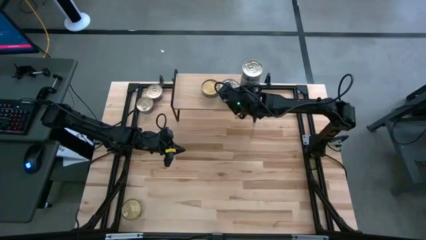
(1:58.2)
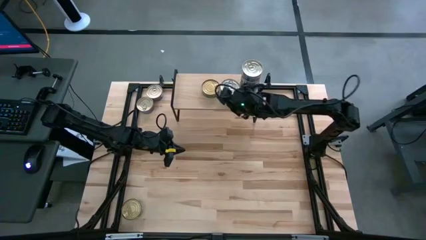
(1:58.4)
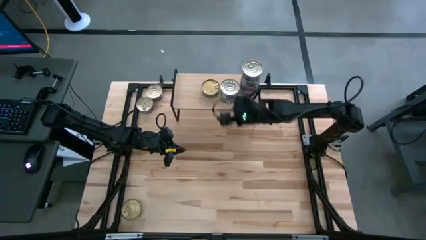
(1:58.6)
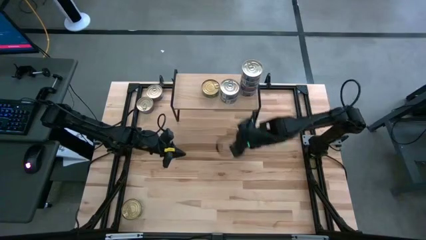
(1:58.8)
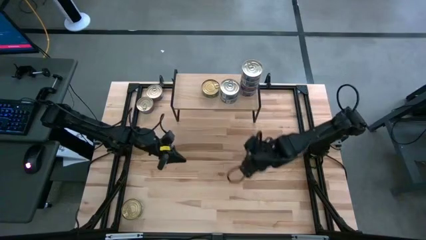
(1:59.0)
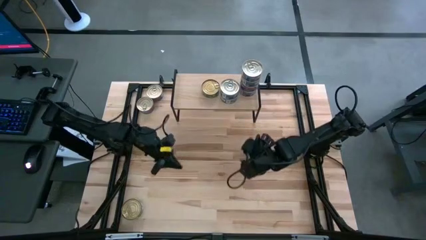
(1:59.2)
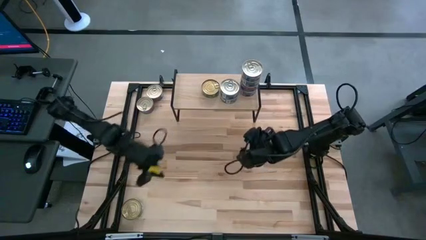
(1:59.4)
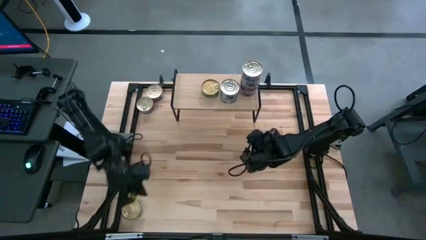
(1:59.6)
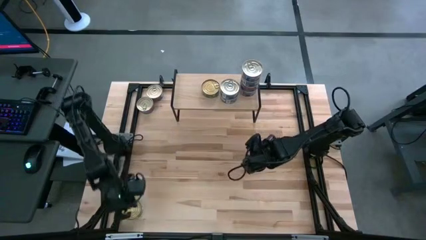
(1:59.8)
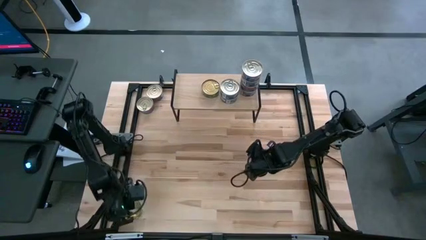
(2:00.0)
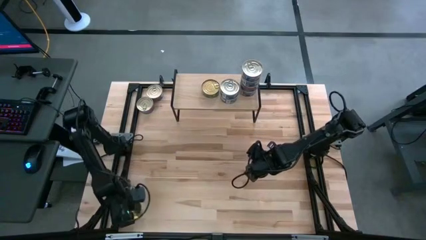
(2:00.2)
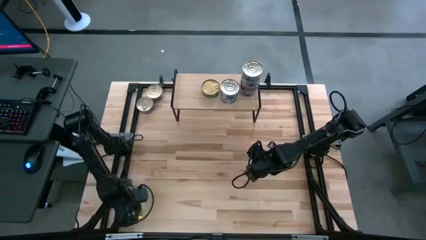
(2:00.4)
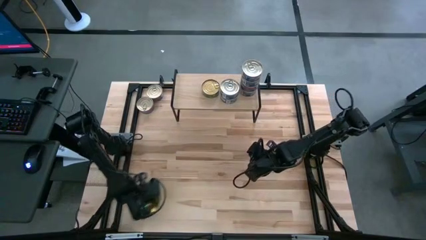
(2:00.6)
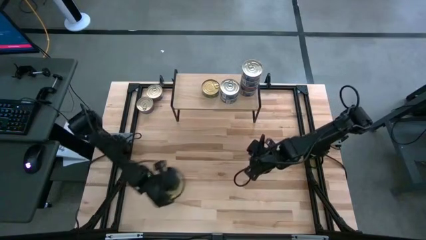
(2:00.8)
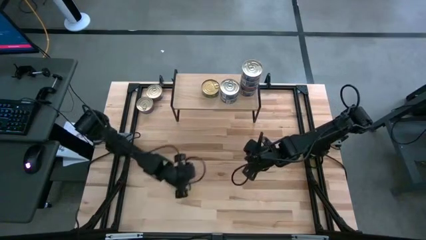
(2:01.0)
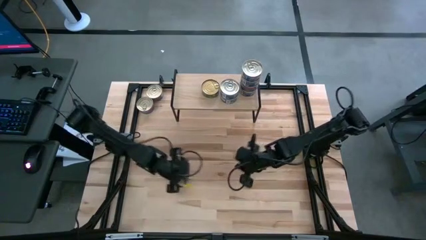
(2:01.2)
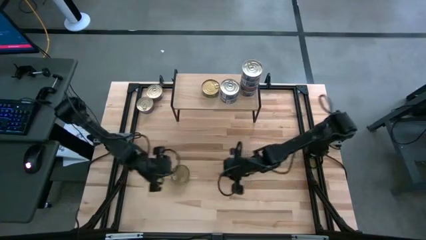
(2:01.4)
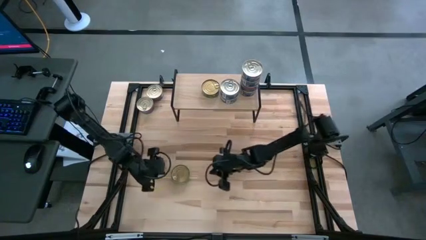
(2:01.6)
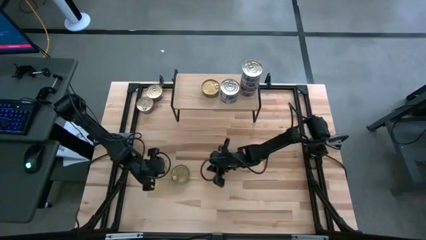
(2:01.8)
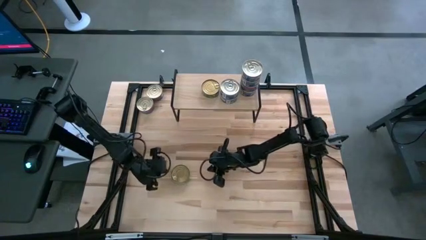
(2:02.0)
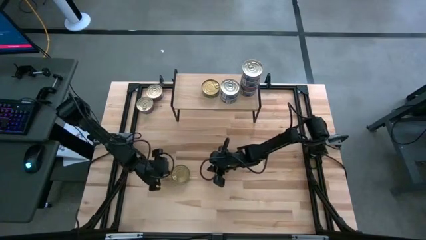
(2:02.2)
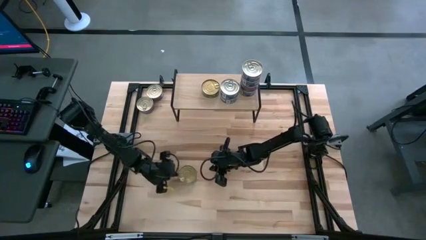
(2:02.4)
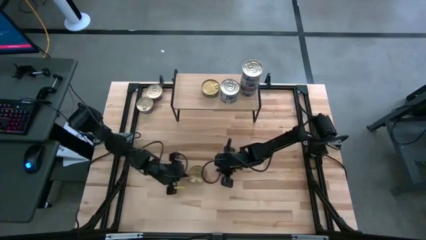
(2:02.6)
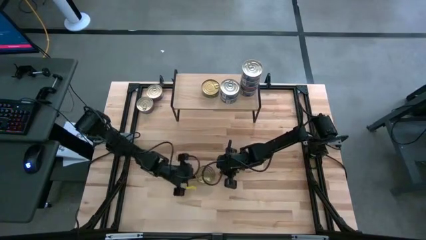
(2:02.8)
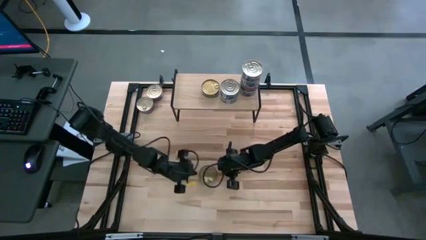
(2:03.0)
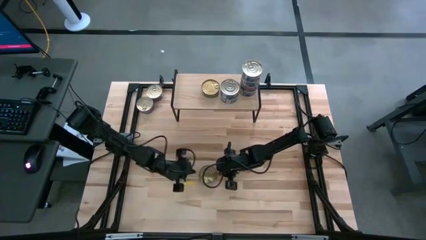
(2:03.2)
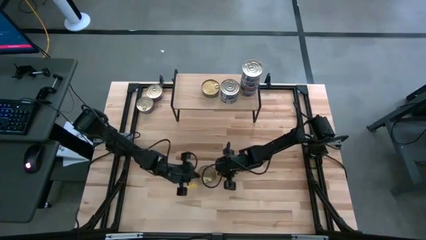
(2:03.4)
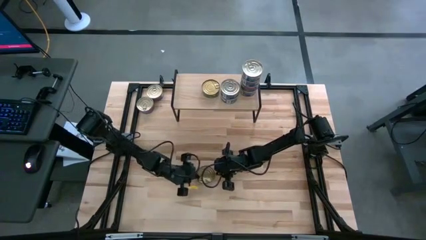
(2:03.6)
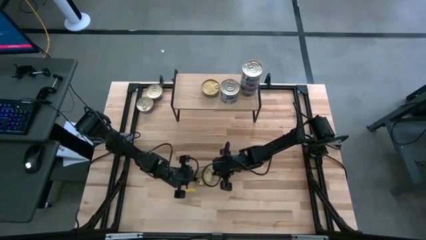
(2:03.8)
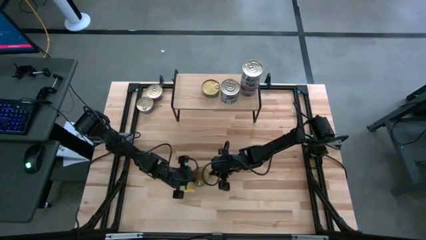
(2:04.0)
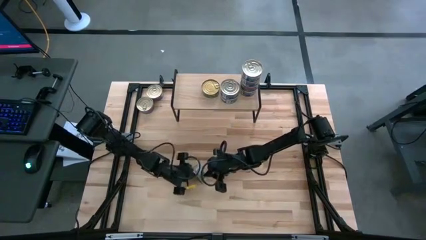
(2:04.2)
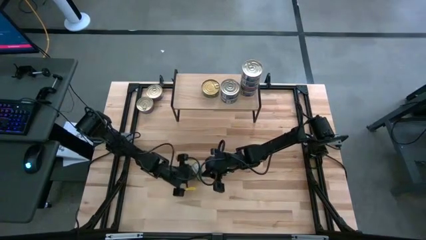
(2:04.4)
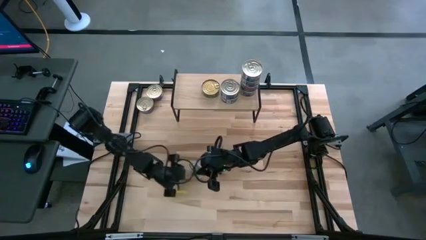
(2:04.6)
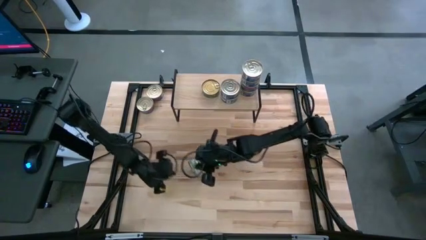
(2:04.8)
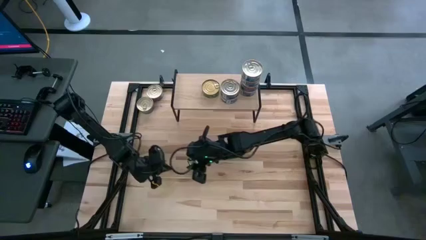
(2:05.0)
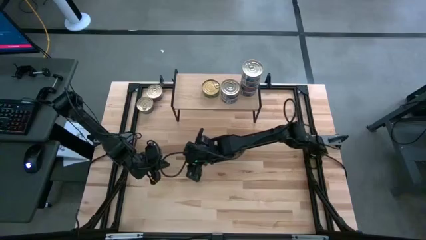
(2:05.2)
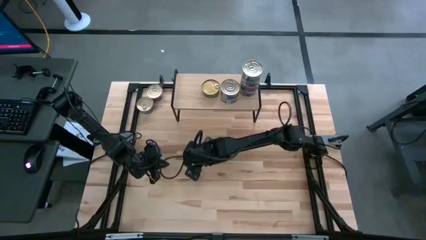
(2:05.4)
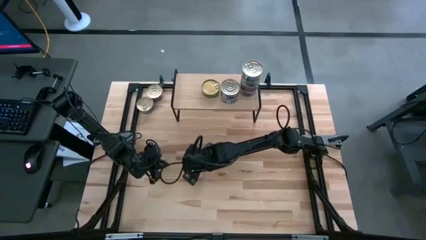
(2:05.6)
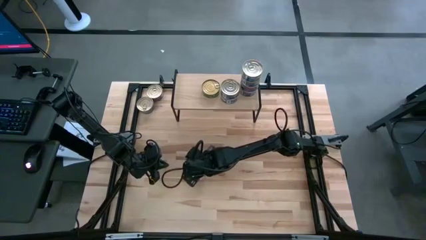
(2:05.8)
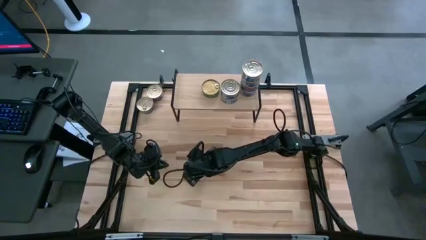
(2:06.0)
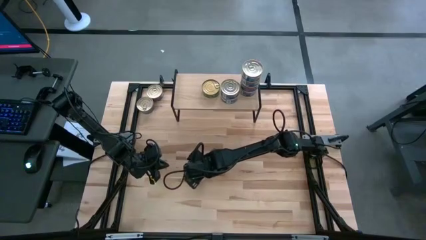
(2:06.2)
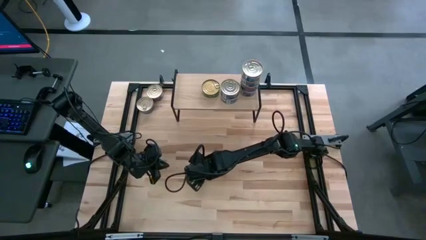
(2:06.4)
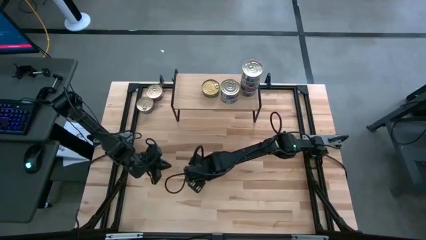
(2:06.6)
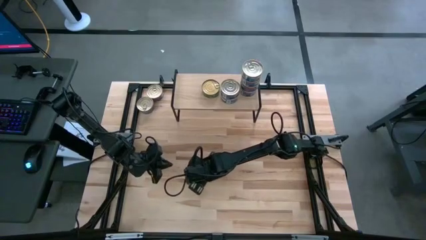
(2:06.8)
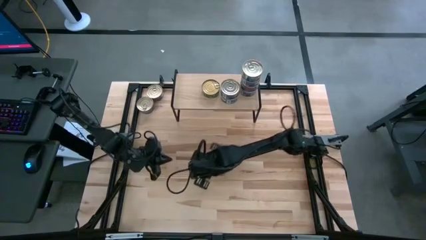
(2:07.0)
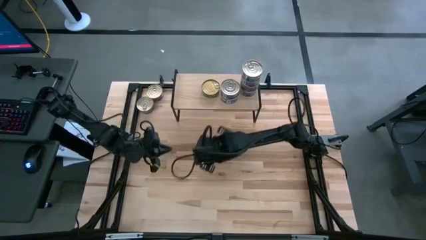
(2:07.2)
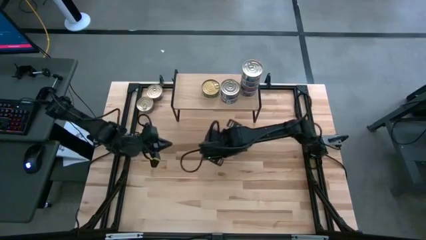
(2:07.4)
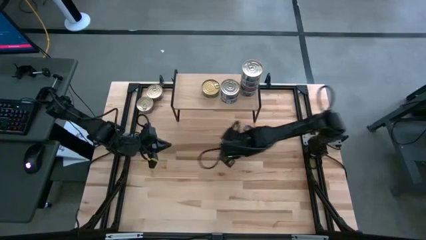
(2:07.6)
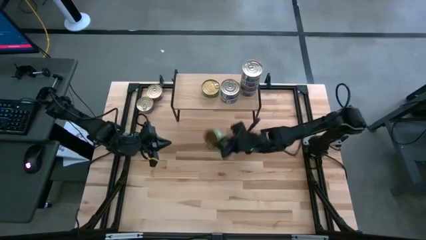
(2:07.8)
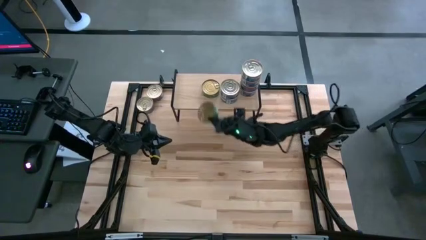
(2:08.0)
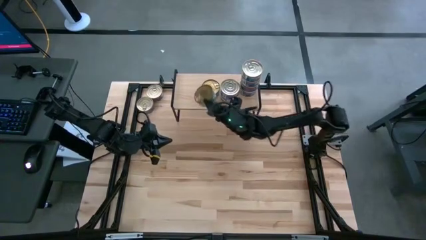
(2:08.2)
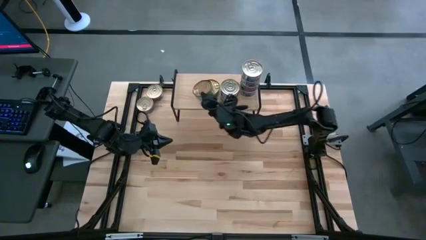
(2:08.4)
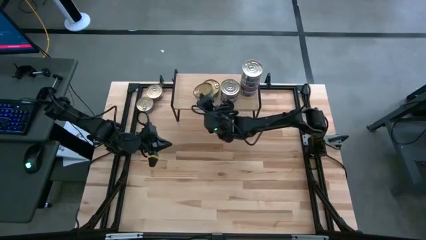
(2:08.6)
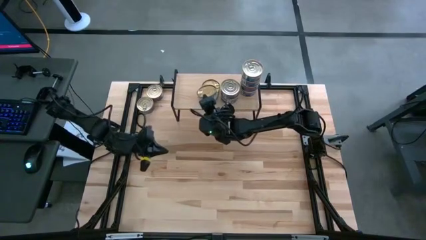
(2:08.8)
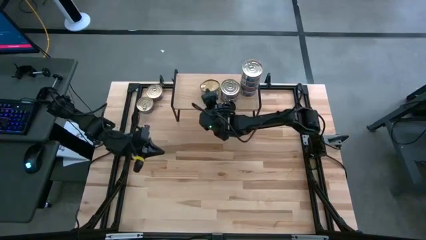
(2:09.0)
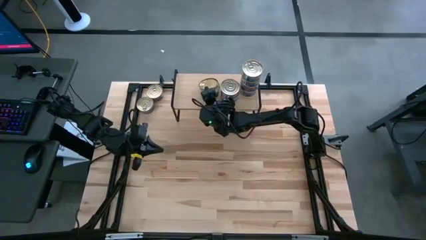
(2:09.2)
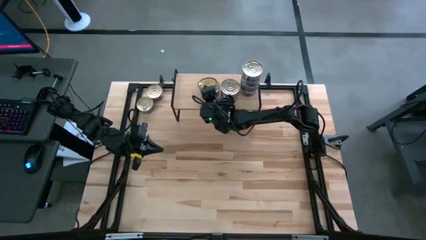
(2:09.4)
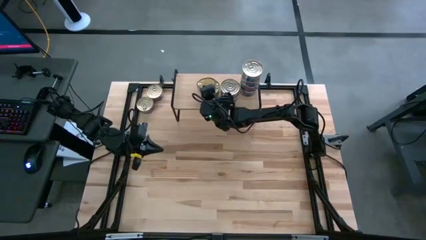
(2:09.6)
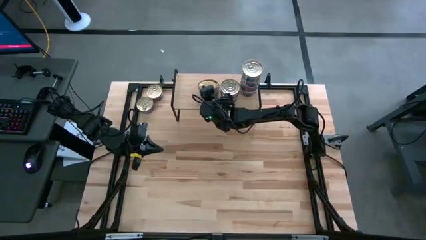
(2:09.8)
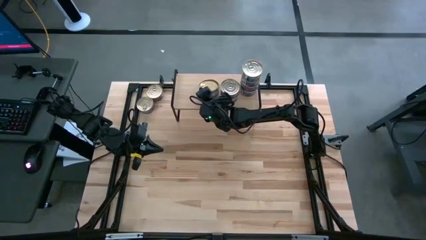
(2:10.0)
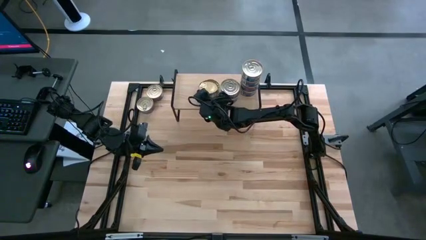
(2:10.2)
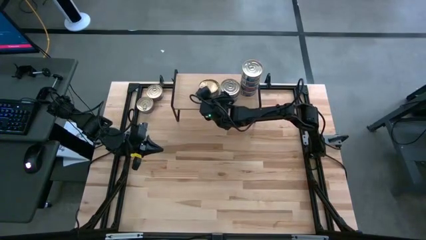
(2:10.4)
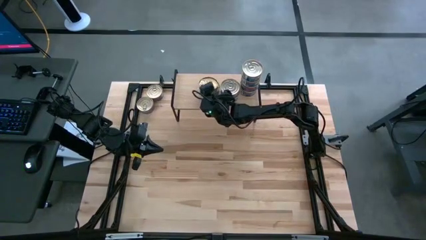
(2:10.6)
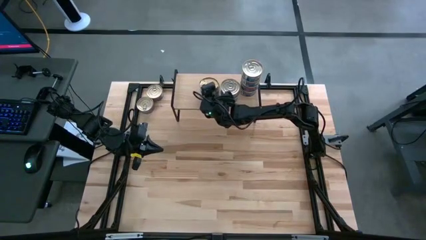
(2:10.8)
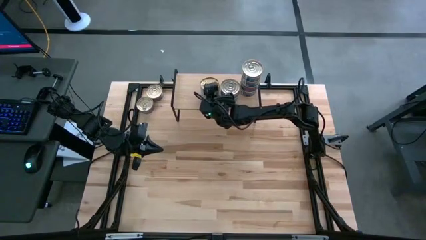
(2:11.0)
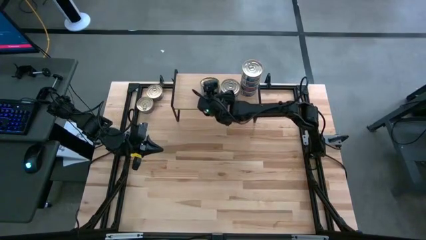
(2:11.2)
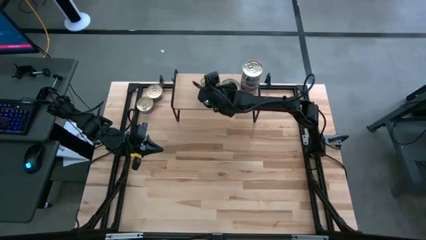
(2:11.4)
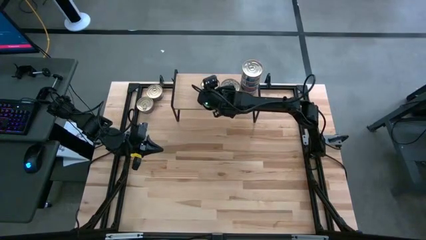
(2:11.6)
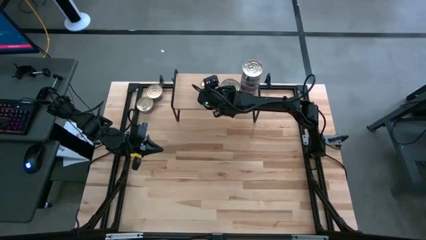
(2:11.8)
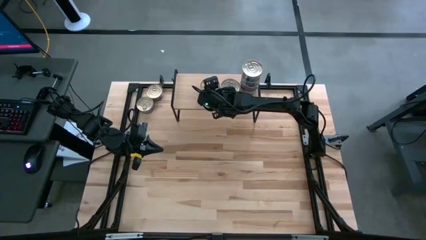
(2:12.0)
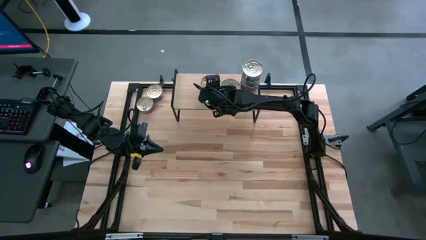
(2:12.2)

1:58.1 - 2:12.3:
Task: Stack canned seafood by type on shelf
Stack the green tuna can on top of the green tuna can on the shelf
